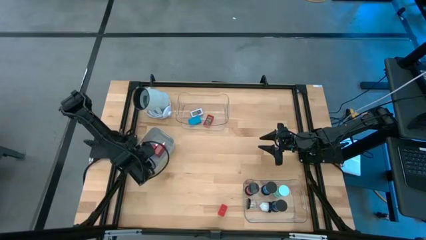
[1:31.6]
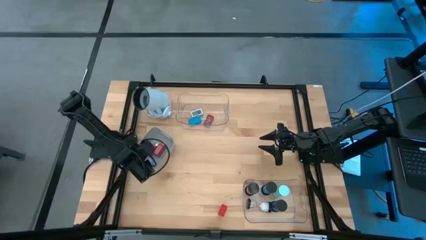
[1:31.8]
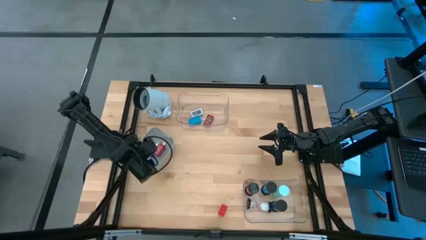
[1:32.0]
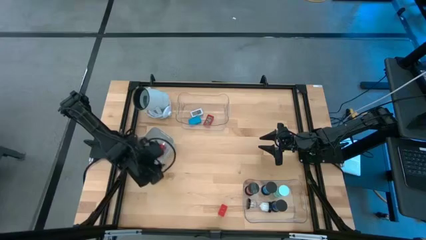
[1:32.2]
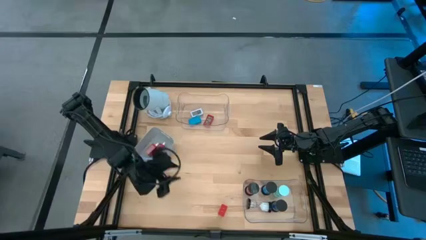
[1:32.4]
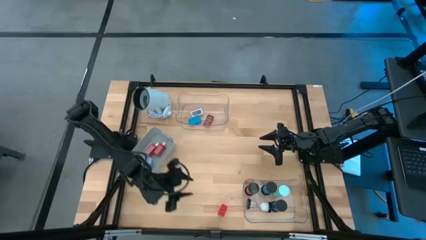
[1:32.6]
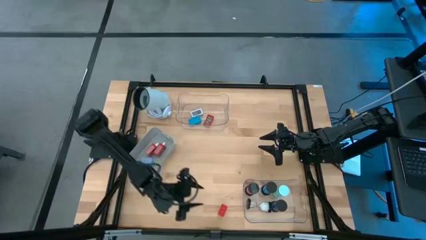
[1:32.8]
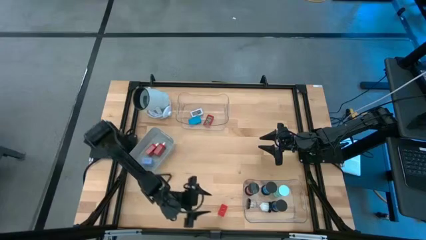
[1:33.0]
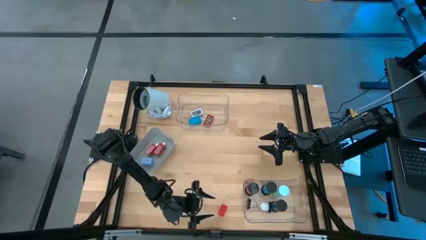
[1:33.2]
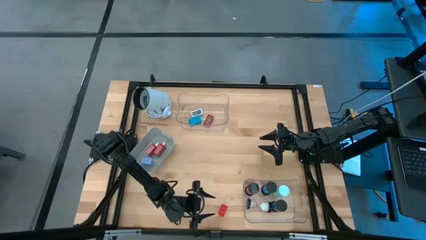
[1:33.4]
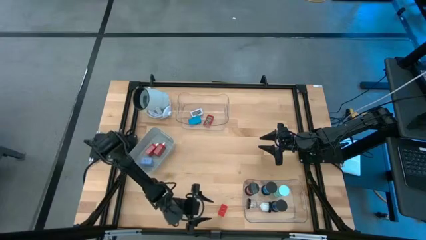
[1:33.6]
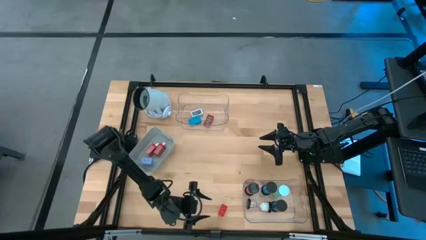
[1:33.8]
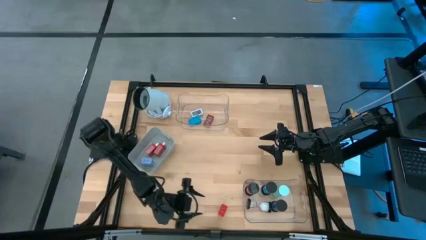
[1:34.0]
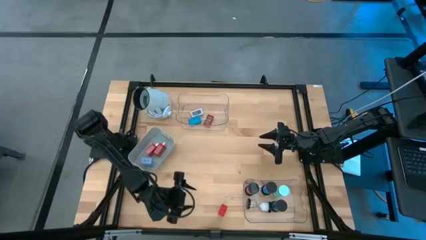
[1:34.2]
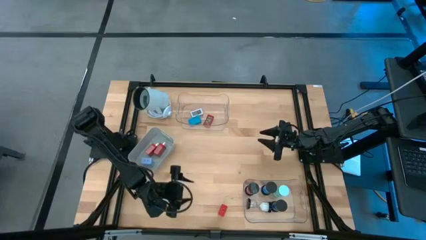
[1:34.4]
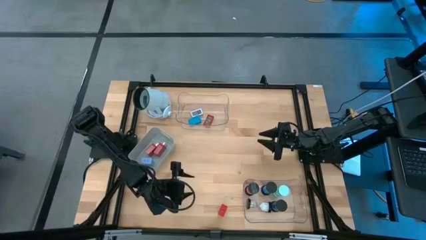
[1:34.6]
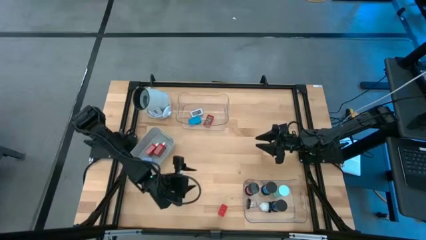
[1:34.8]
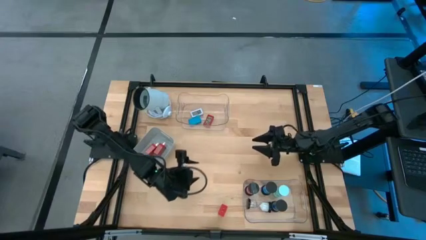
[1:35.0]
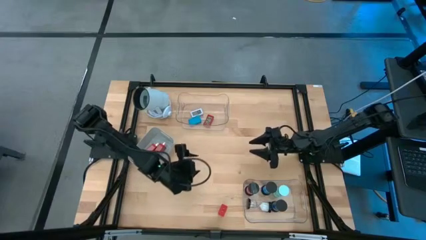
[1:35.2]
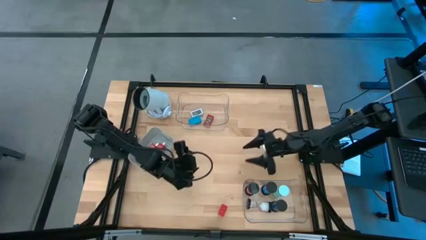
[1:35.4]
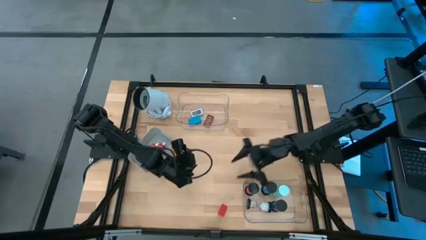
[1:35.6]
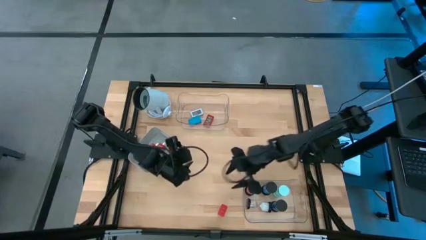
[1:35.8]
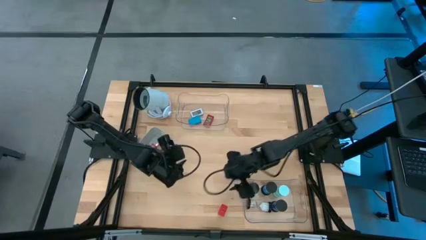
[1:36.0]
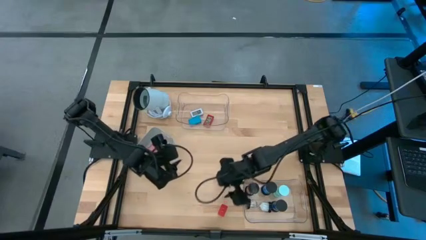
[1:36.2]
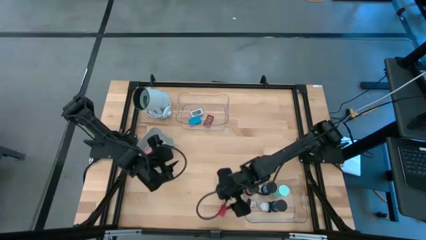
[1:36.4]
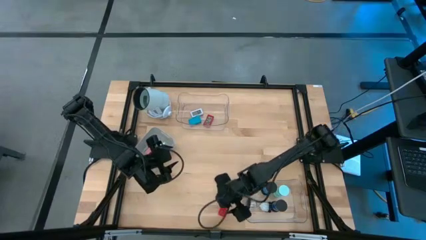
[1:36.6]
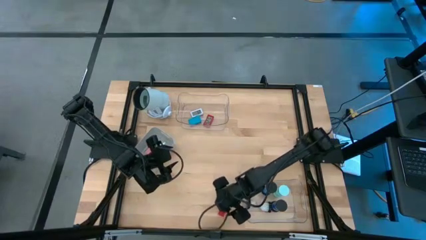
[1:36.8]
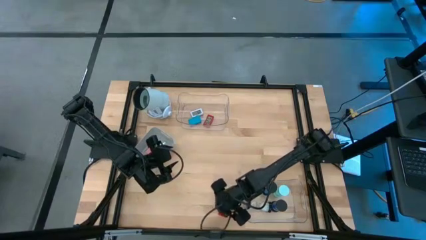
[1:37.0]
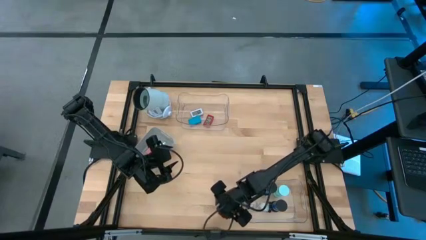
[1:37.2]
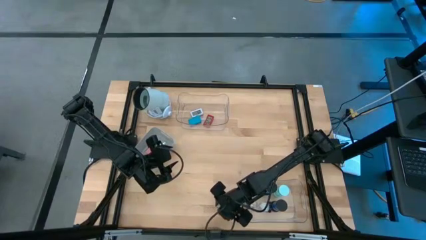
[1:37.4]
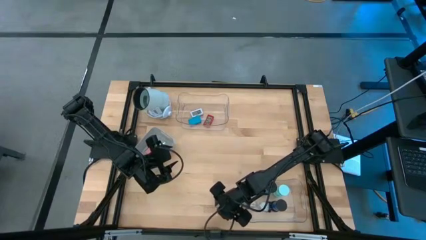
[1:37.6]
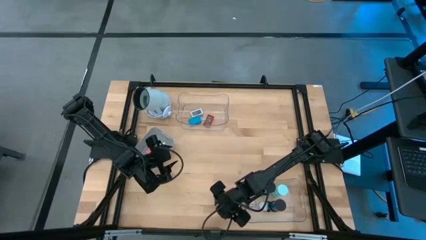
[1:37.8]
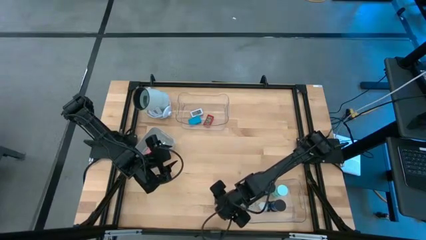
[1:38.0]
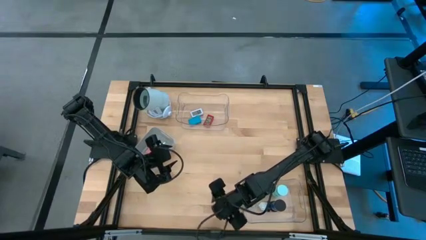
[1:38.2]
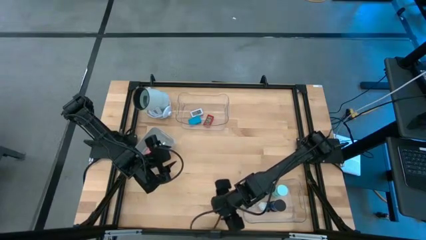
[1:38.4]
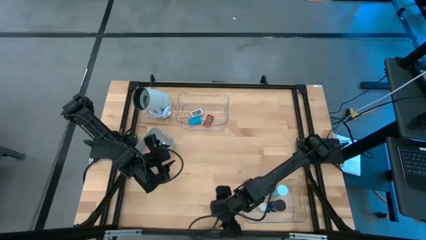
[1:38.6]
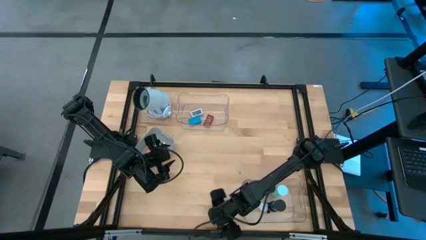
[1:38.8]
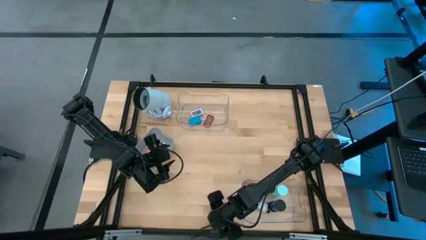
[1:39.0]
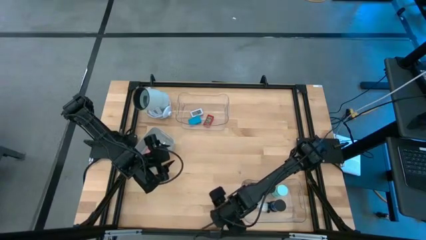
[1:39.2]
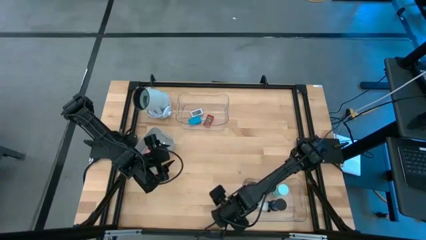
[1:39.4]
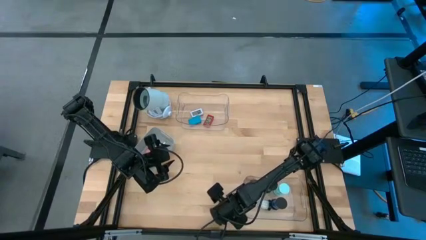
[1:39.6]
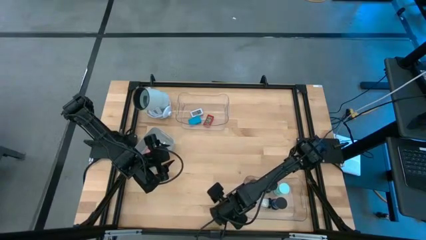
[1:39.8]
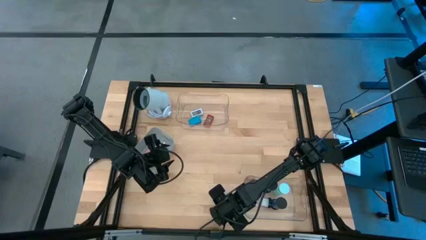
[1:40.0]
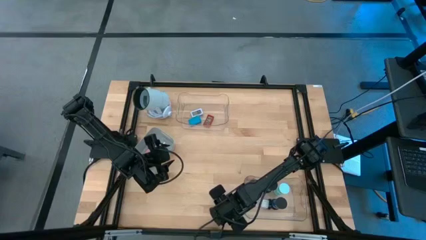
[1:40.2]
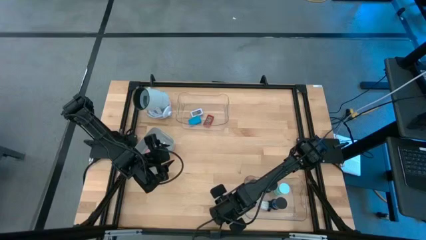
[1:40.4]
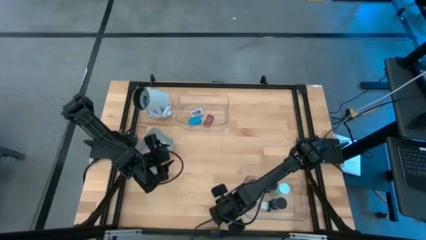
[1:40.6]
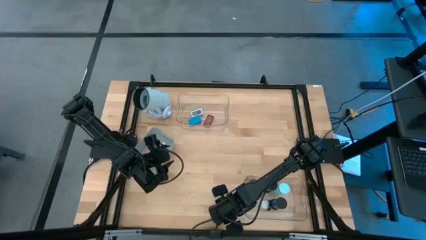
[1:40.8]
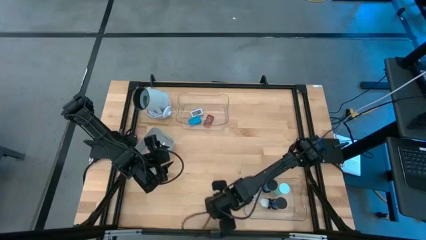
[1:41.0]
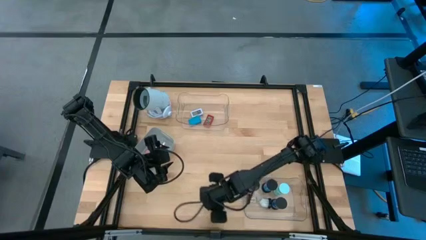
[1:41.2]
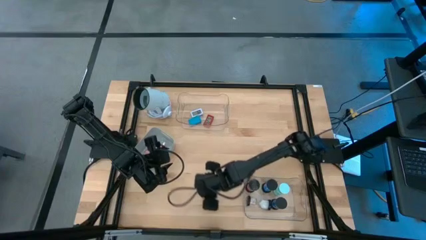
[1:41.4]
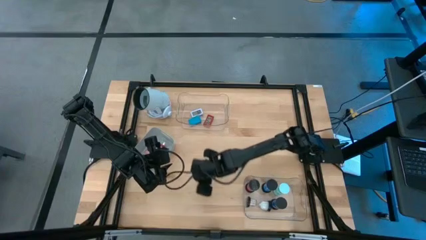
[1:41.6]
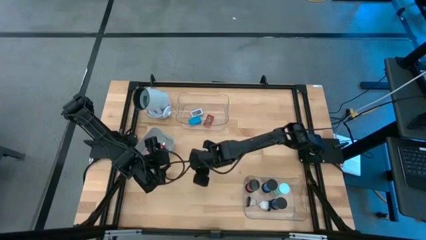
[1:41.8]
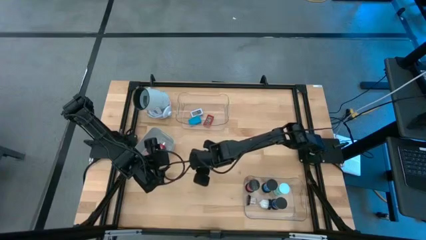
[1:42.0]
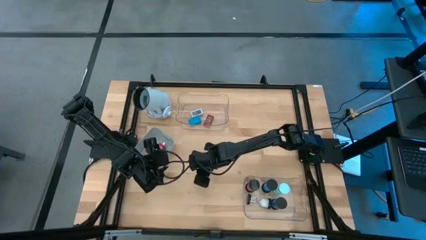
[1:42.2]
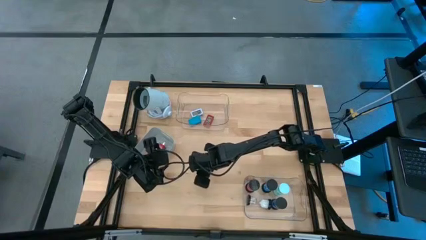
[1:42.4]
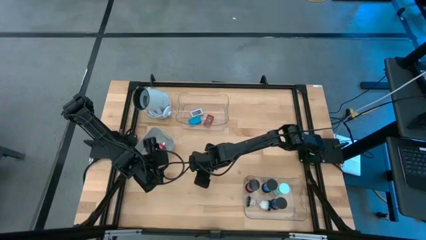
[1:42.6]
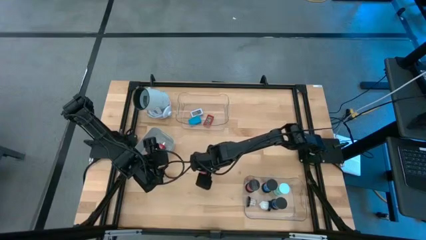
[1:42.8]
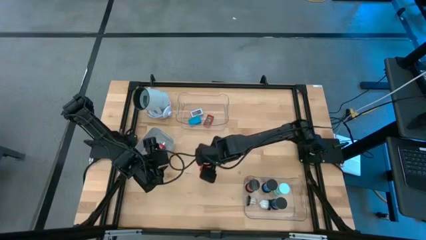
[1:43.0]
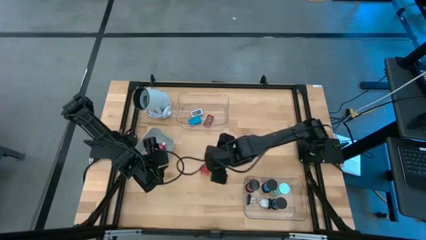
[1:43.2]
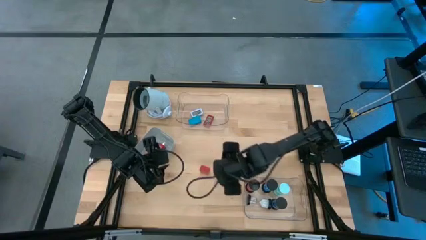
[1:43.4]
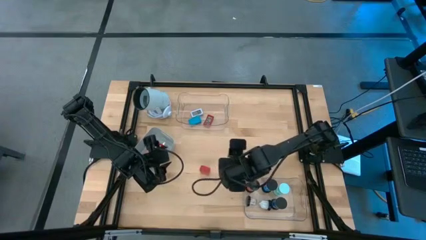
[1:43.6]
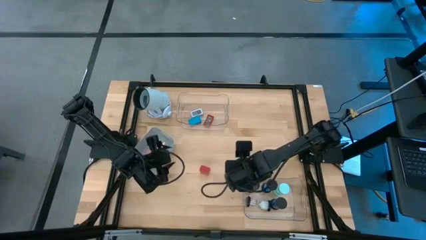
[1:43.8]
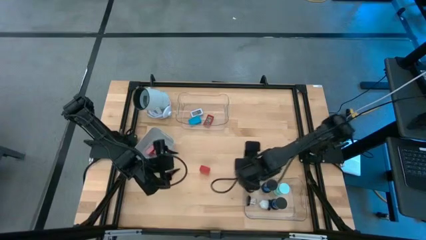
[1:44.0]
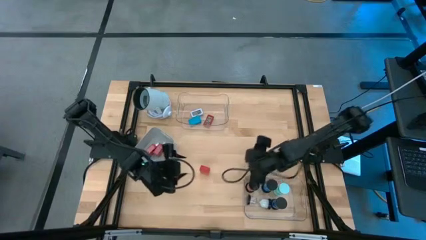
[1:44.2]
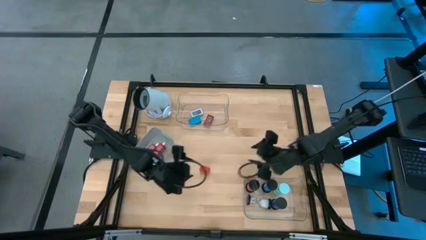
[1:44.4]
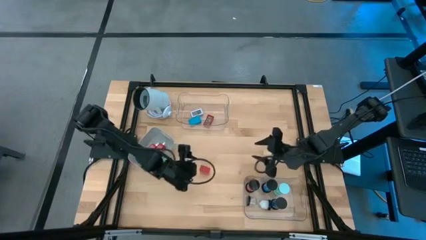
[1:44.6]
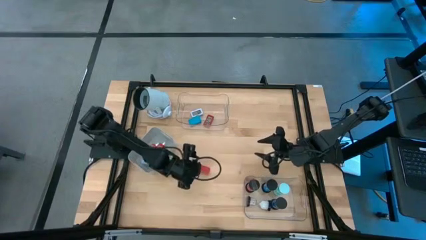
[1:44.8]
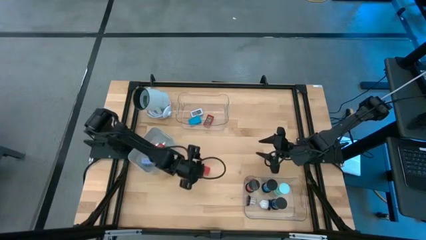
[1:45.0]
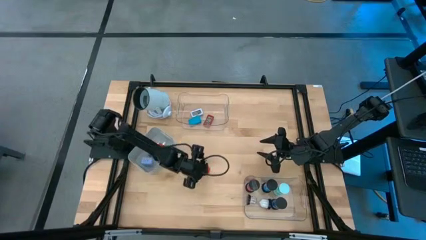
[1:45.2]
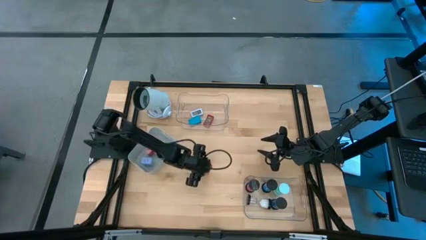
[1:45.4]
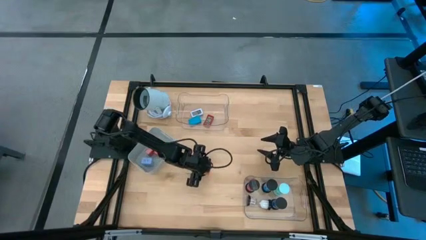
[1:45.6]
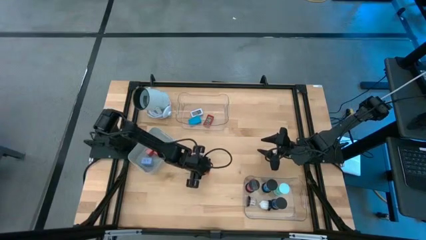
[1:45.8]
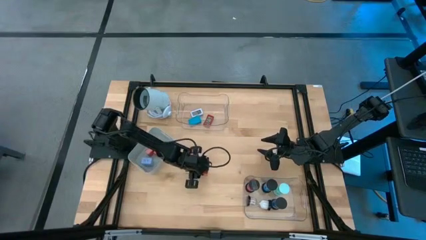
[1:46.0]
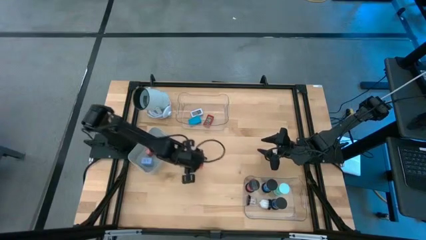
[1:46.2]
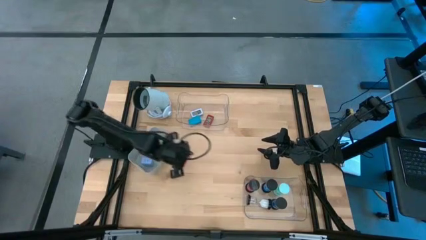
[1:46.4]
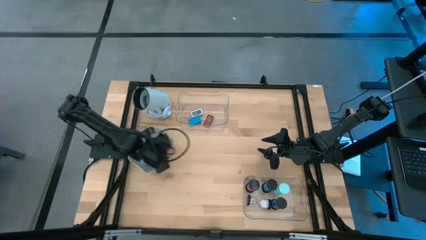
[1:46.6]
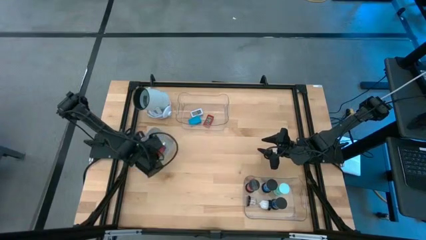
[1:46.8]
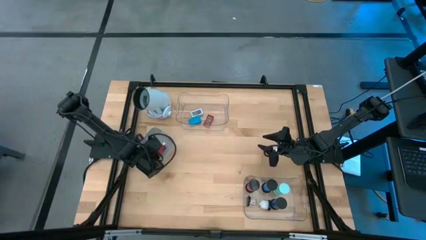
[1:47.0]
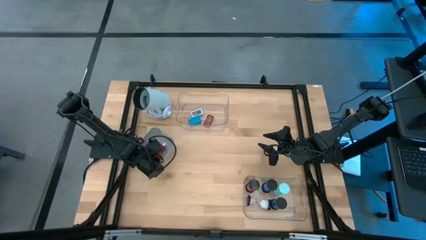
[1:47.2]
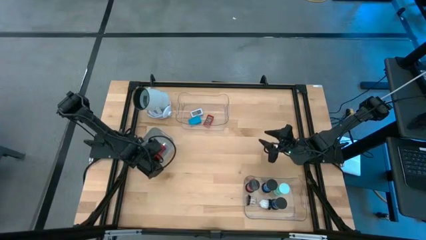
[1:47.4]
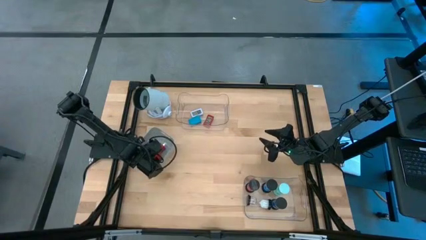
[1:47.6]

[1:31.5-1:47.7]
Task: Pick & Place Office items
Put the orange charger adapter into the gray bin
